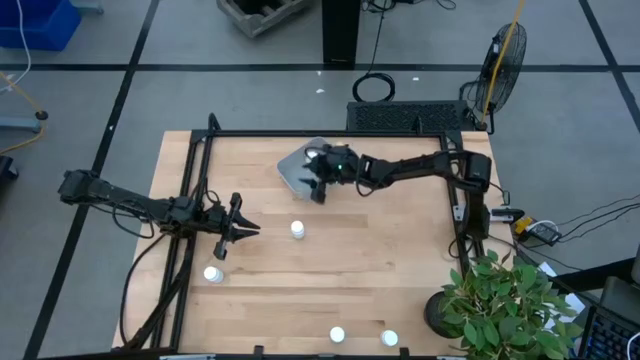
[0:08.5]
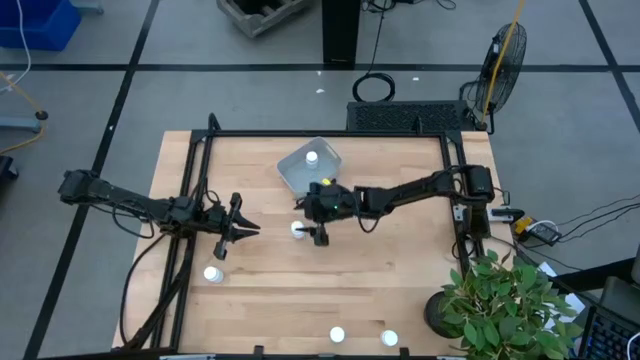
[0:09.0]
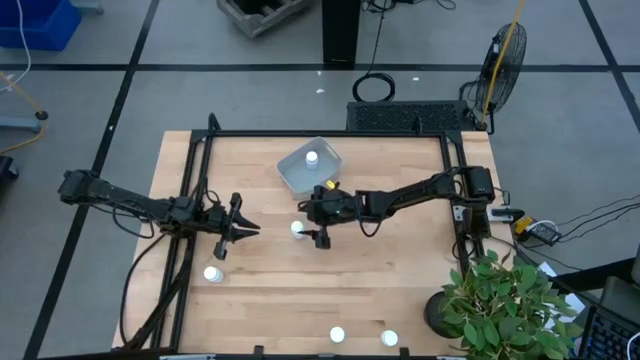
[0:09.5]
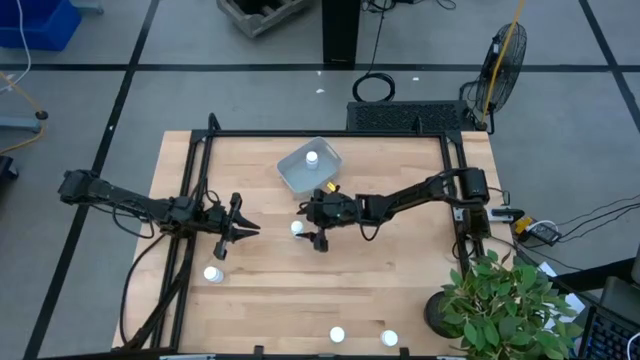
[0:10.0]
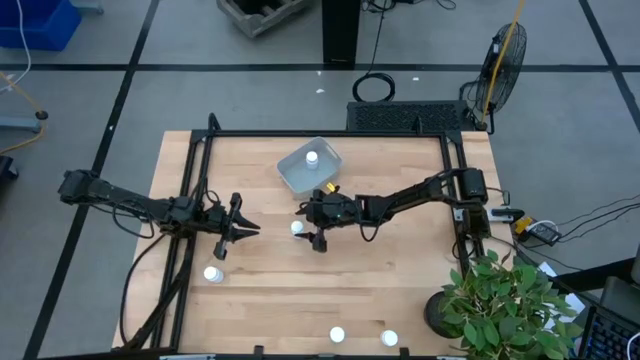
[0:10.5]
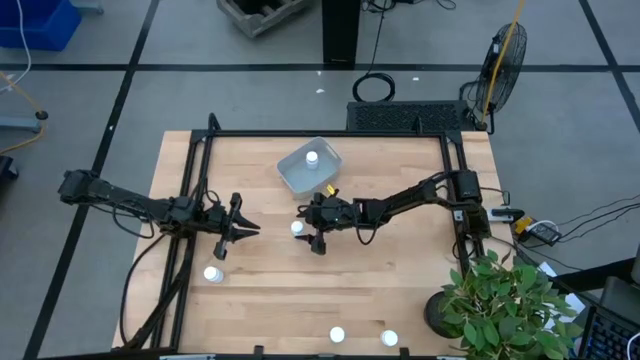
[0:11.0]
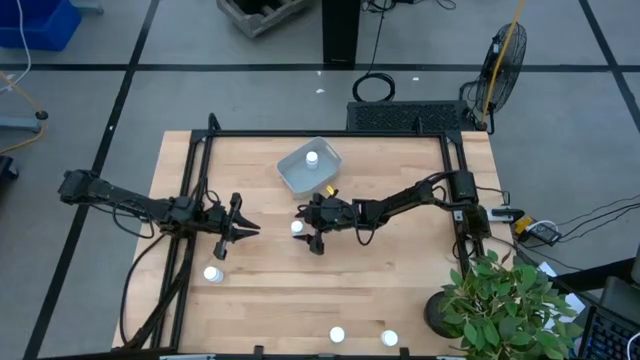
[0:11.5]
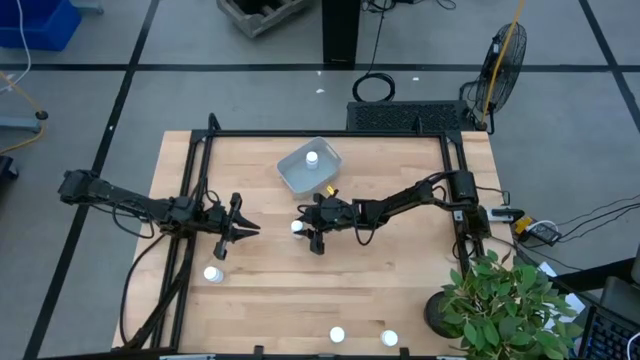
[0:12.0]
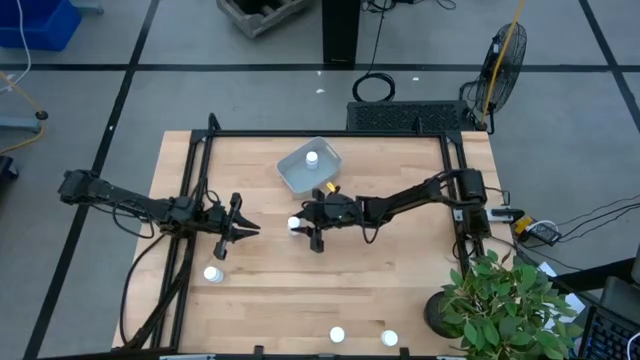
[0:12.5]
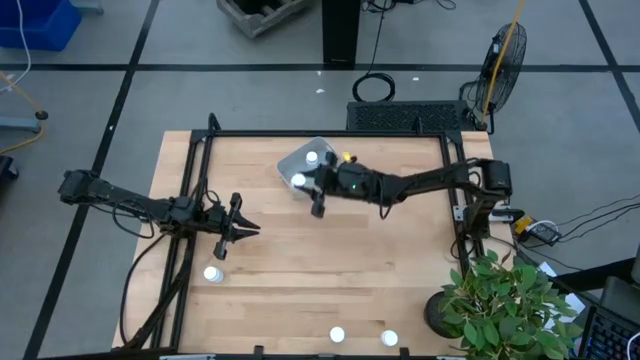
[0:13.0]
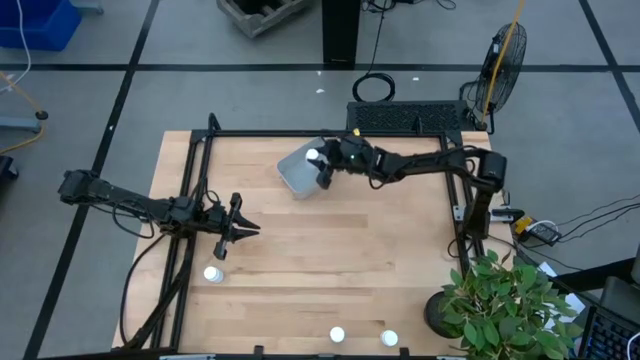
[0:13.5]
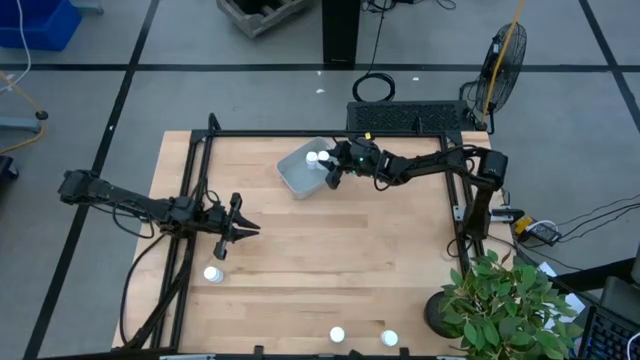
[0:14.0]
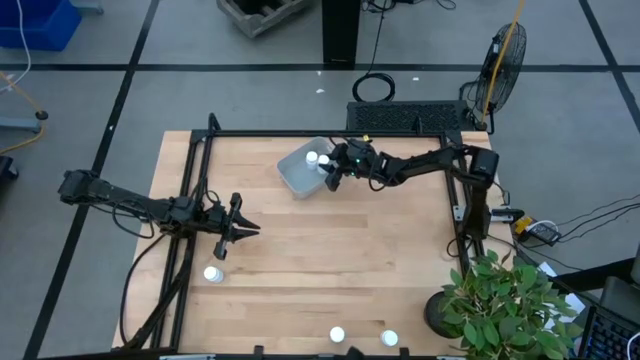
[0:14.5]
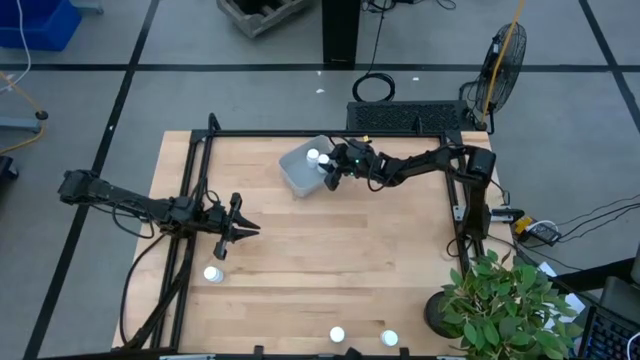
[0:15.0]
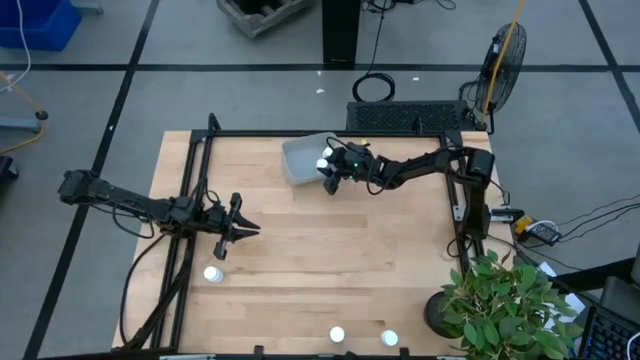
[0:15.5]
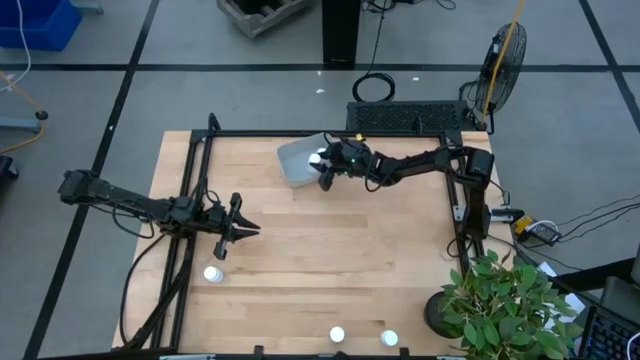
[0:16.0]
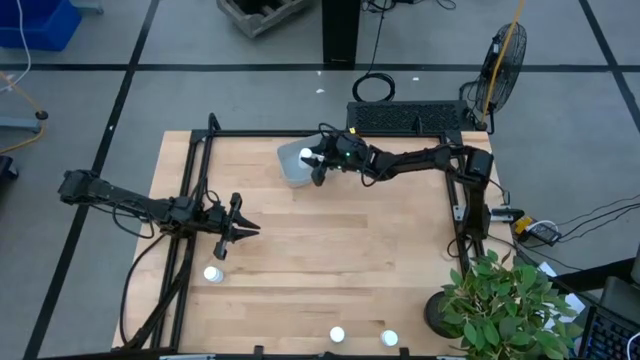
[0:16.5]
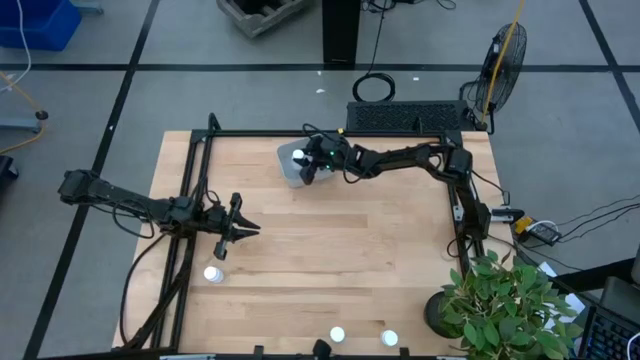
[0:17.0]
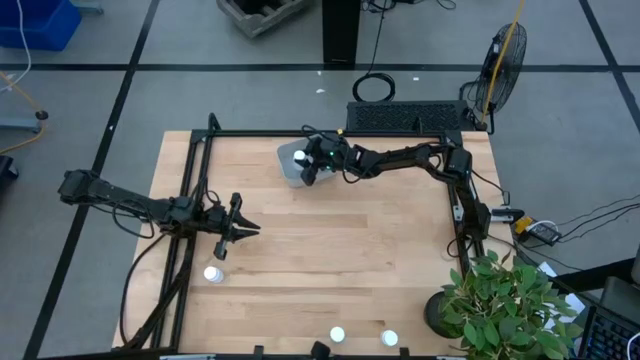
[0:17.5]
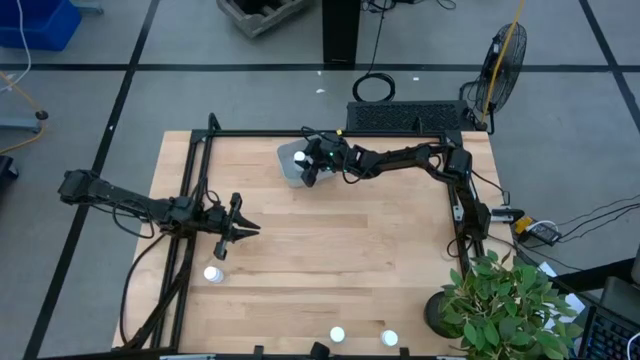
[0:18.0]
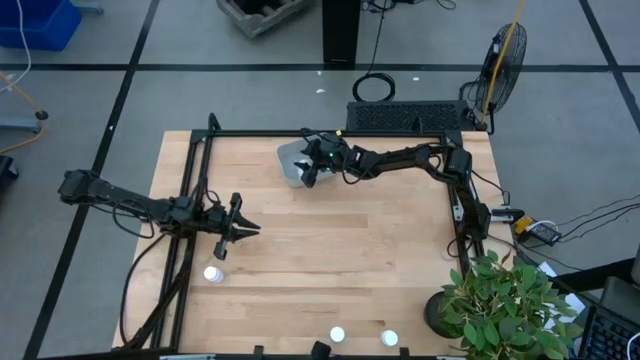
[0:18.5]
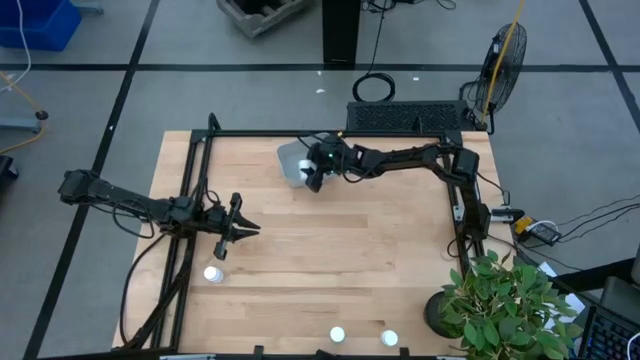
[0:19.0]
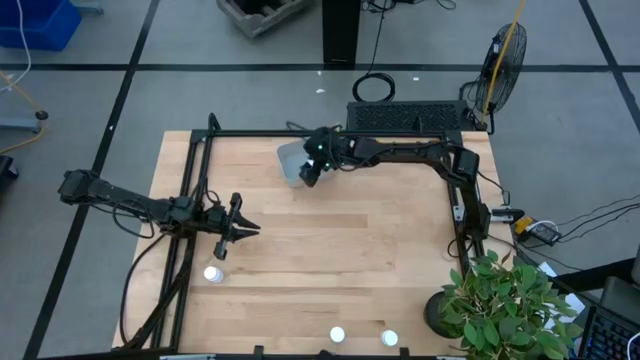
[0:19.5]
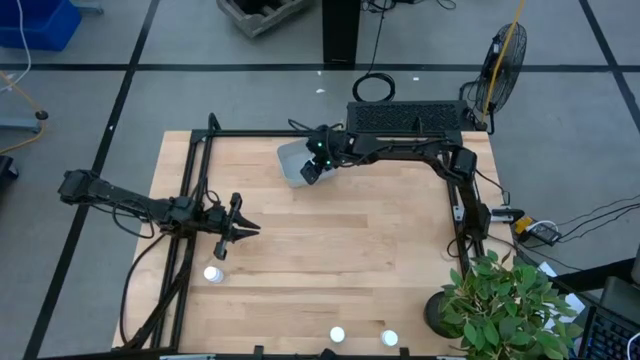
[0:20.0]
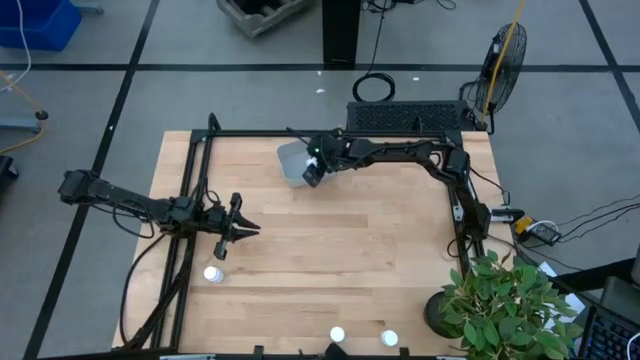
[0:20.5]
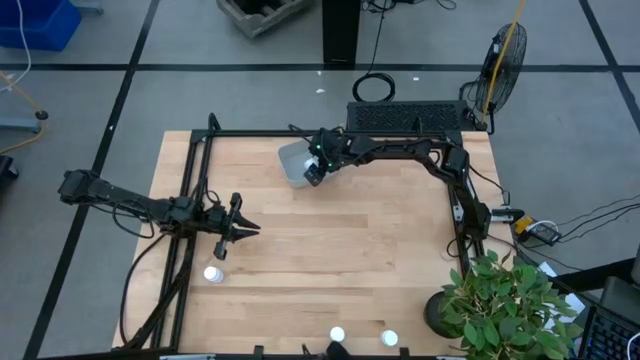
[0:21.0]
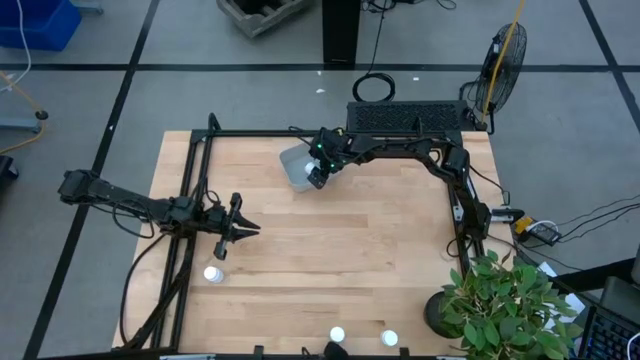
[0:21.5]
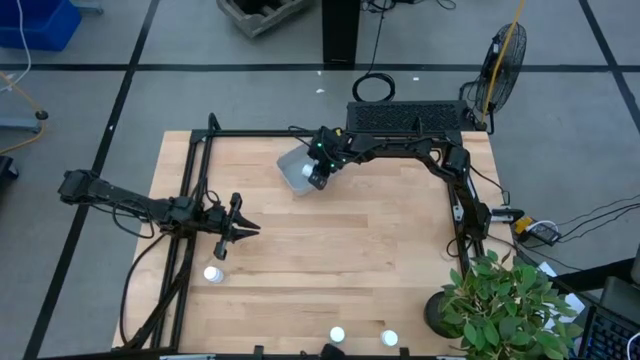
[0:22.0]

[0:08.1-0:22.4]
Task: Pick and place pill bottles into a basket
Put the white medicine bottle into the gray bin

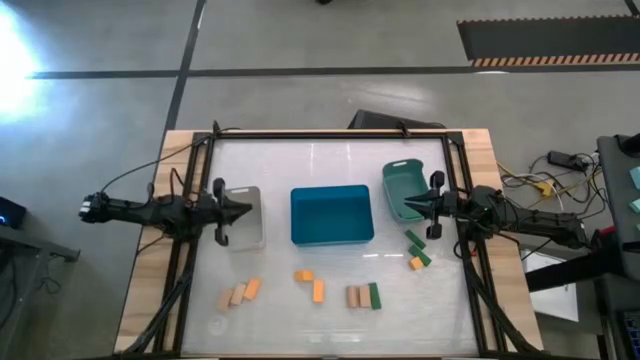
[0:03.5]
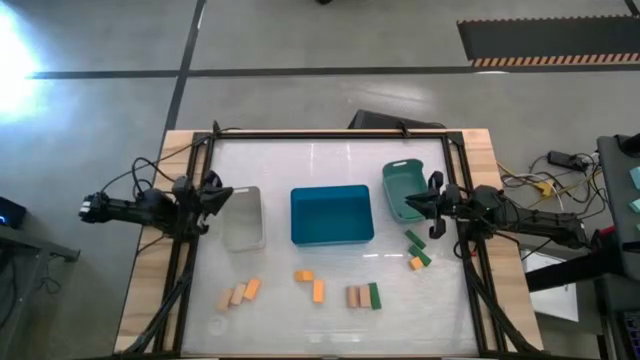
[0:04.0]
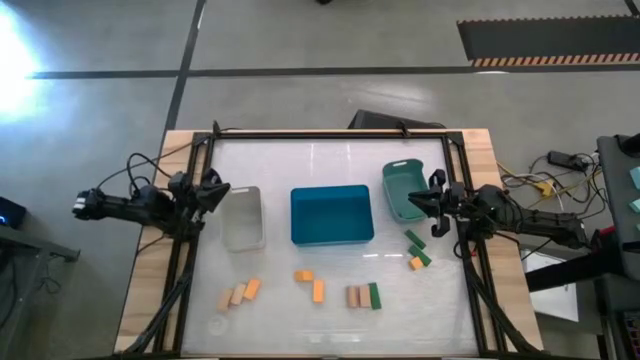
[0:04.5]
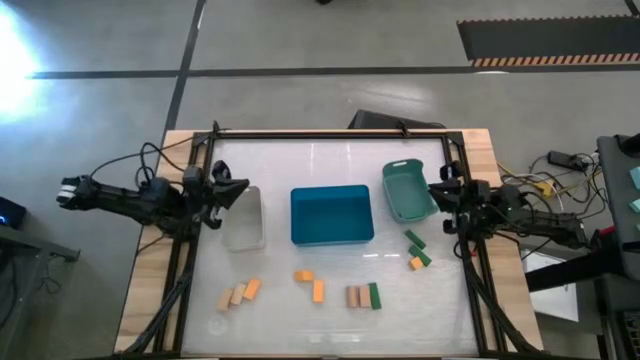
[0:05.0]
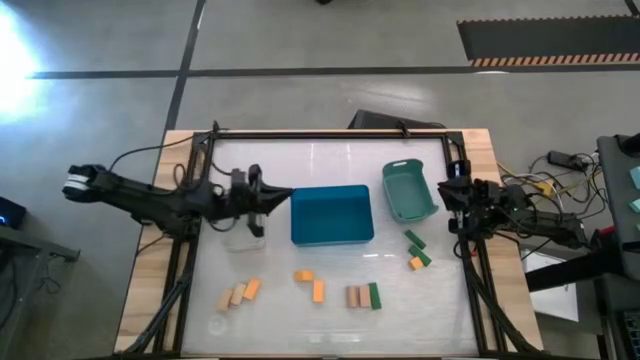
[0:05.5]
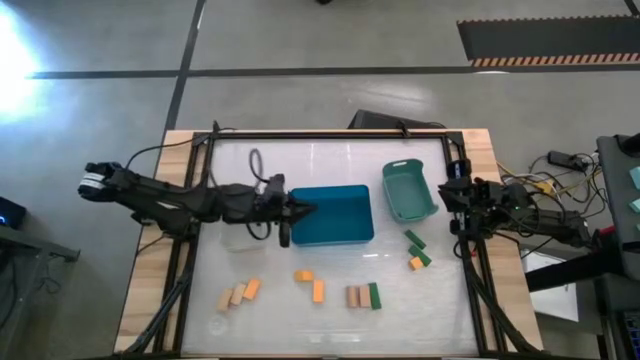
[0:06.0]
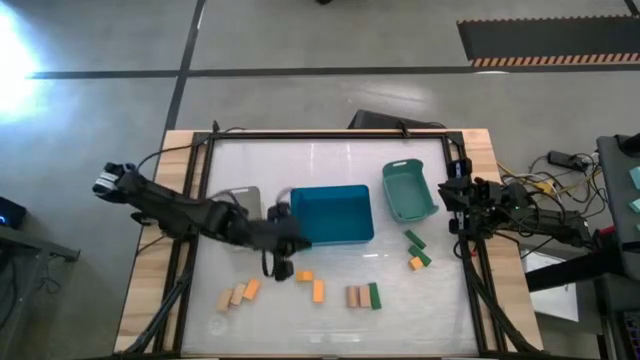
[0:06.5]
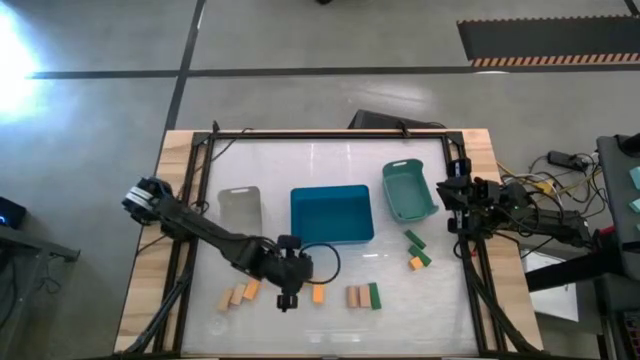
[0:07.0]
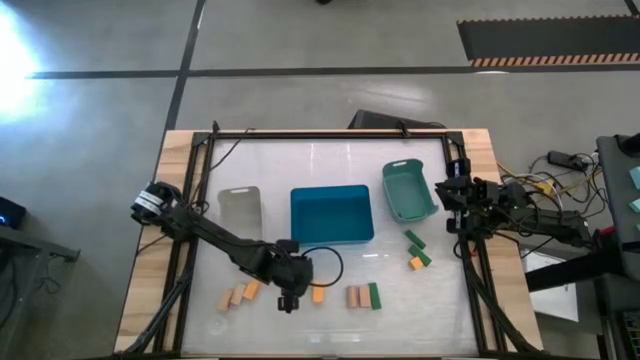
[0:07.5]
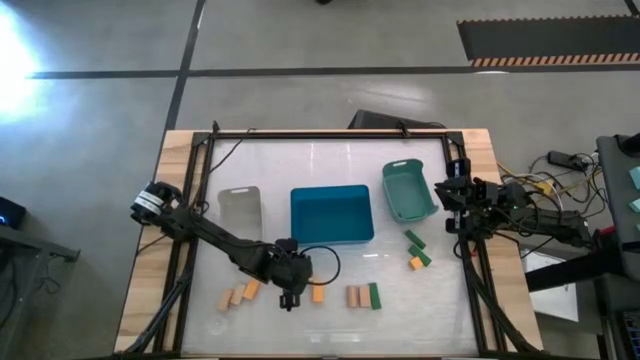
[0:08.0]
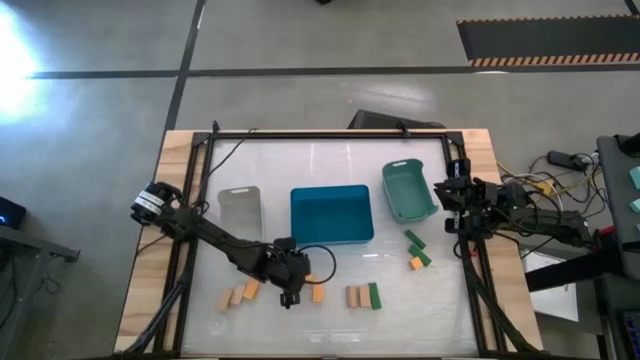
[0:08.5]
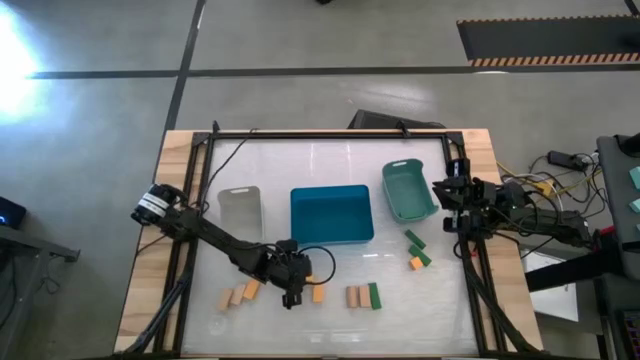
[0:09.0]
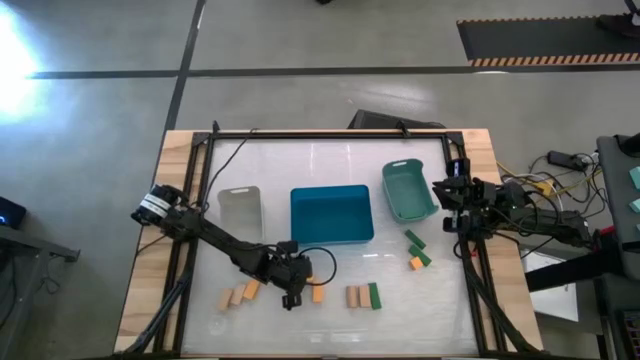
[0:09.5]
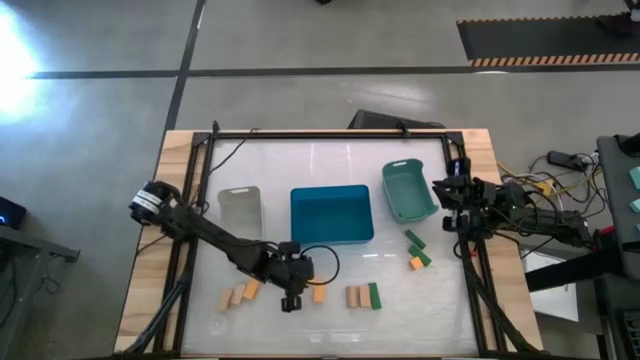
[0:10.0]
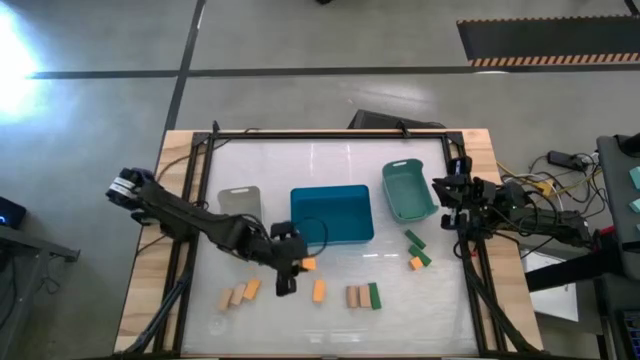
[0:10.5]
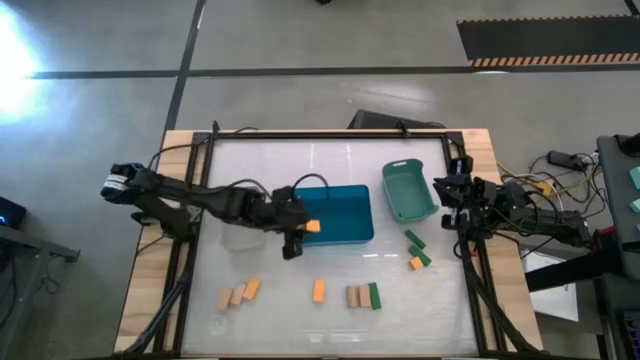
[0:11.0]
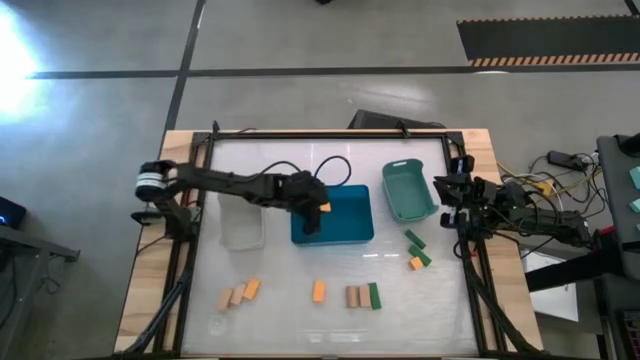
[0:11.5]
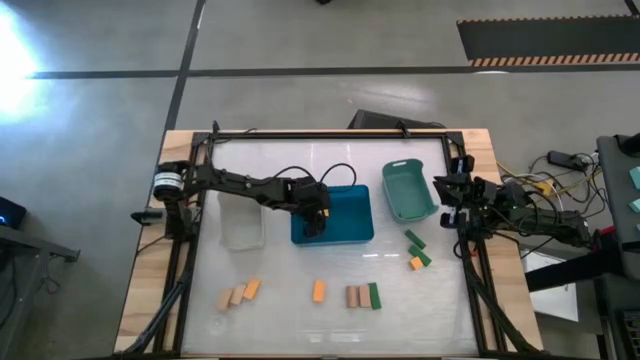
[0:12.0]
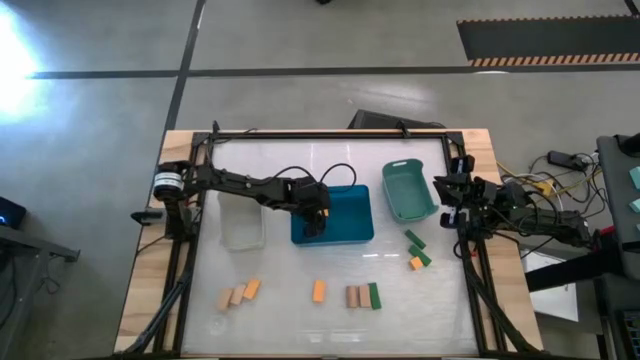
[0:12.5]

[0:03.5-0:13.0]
Task: Sort & place blocks by color
Put the yellow block into the blue bin
